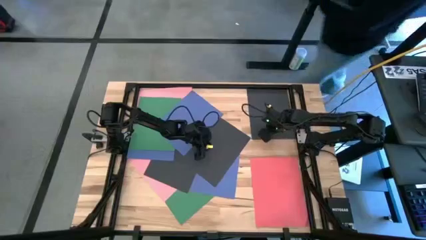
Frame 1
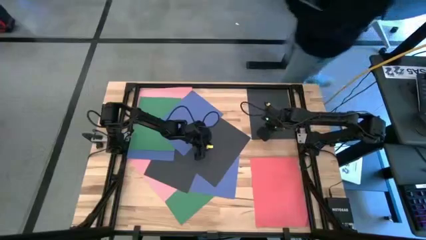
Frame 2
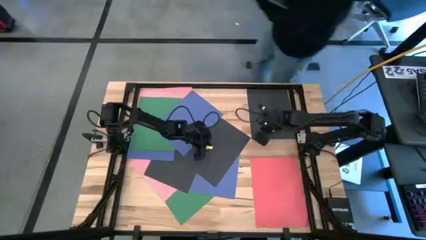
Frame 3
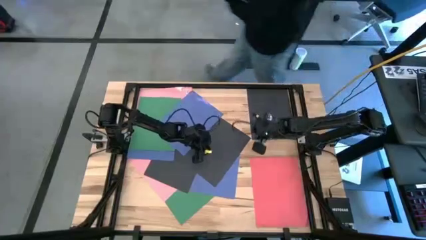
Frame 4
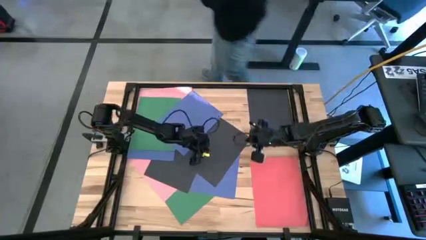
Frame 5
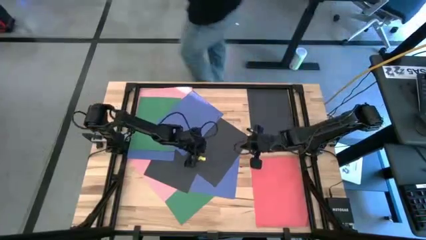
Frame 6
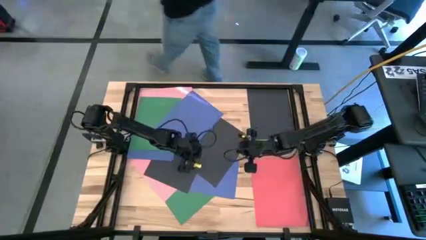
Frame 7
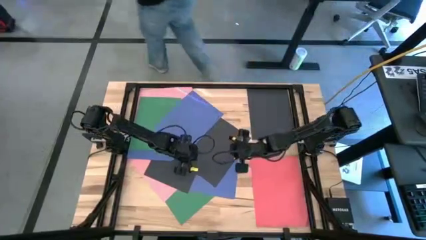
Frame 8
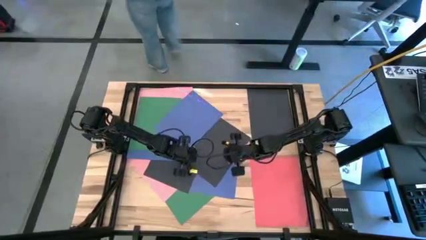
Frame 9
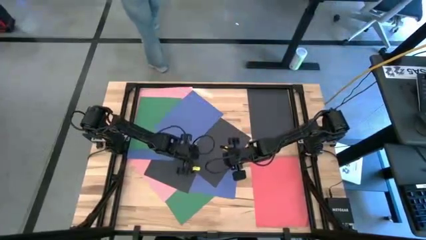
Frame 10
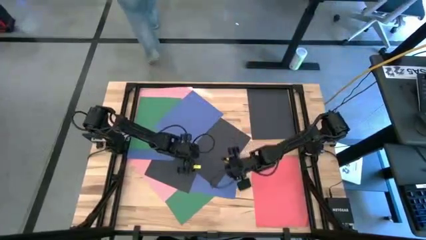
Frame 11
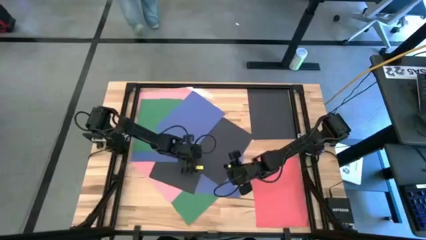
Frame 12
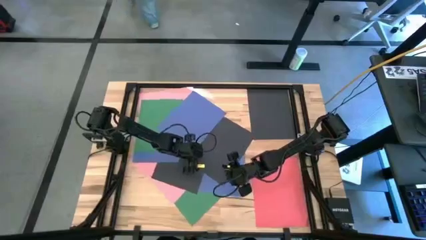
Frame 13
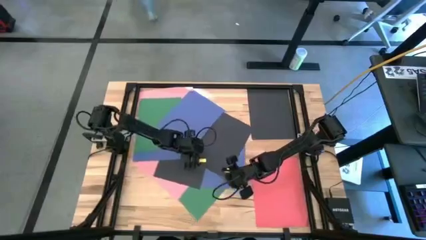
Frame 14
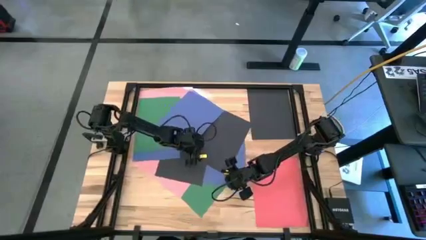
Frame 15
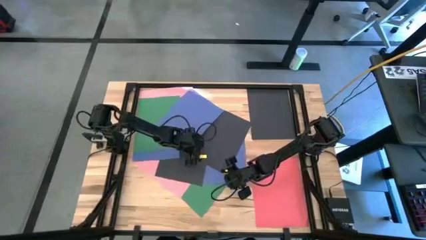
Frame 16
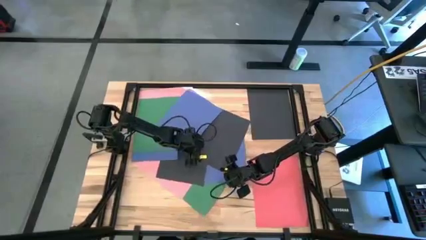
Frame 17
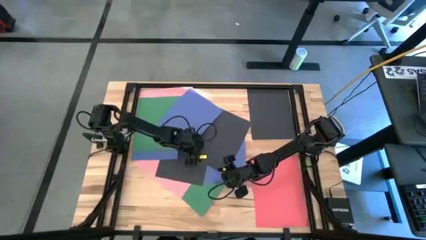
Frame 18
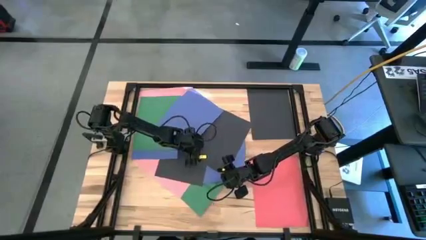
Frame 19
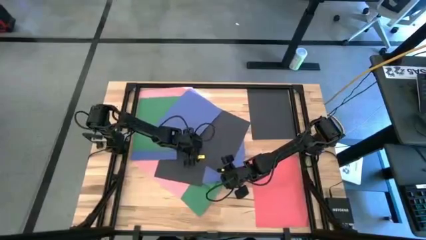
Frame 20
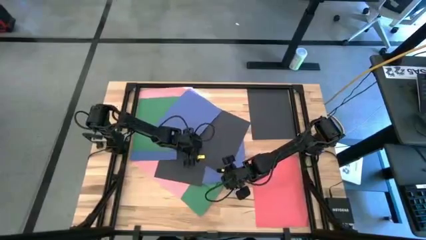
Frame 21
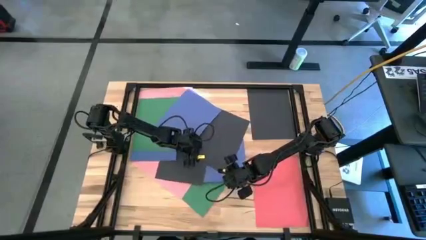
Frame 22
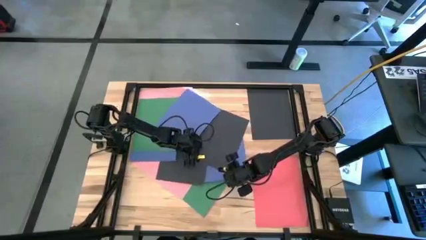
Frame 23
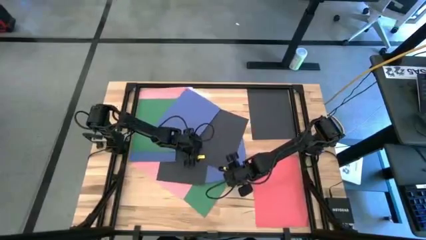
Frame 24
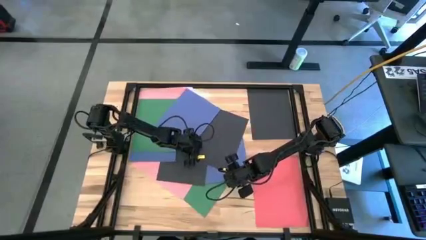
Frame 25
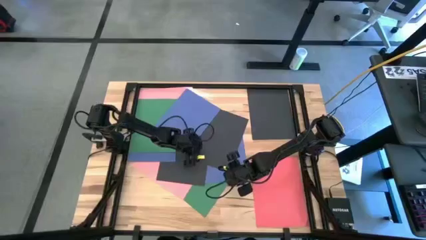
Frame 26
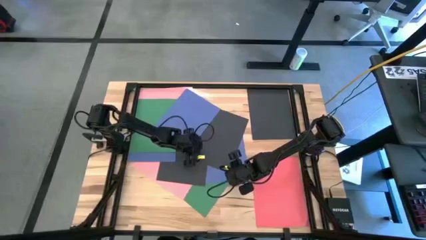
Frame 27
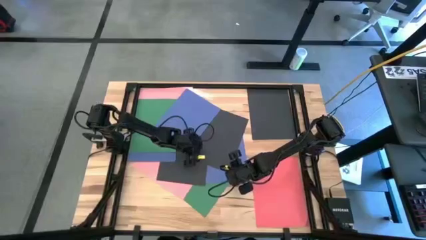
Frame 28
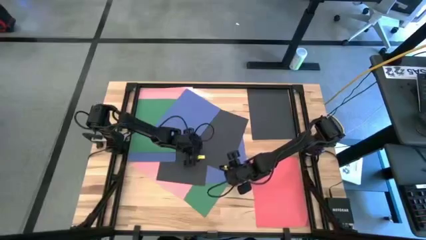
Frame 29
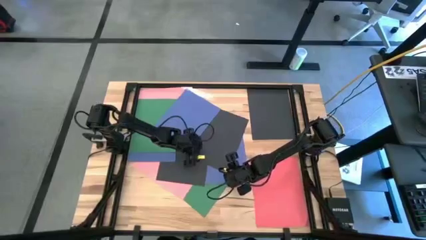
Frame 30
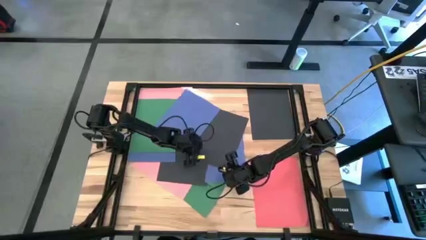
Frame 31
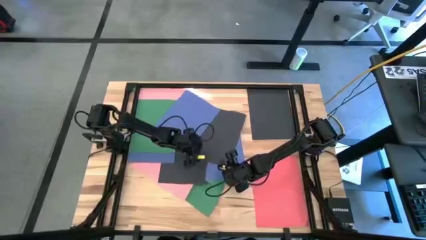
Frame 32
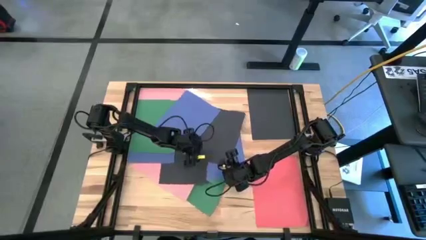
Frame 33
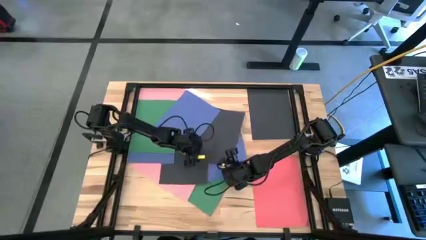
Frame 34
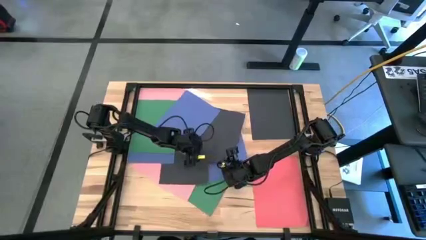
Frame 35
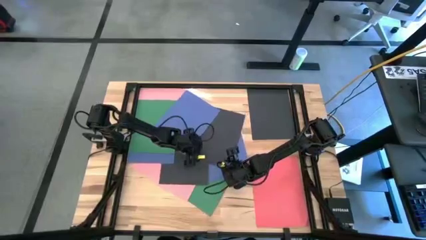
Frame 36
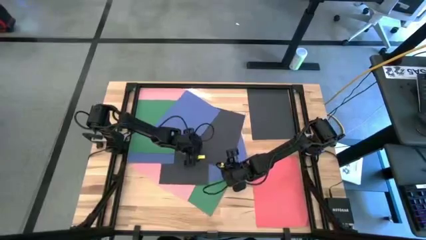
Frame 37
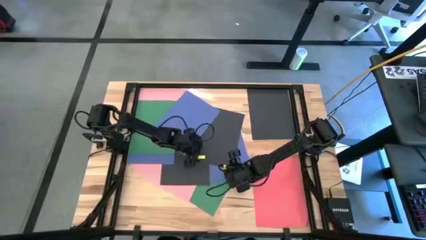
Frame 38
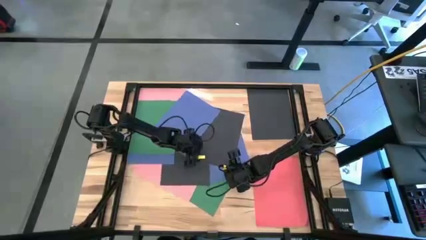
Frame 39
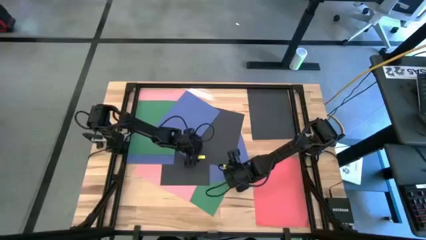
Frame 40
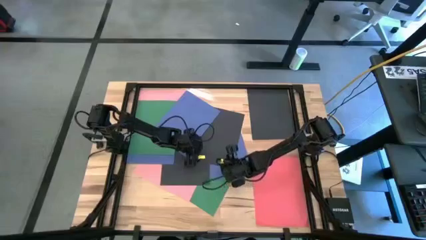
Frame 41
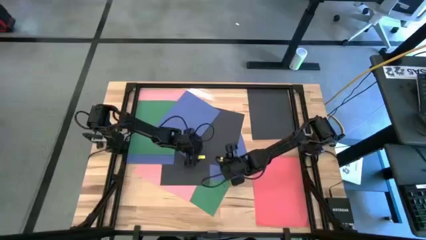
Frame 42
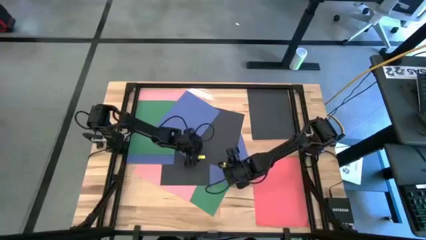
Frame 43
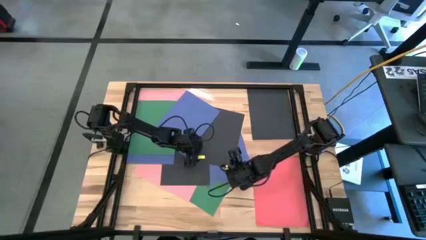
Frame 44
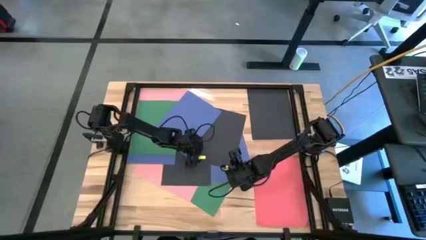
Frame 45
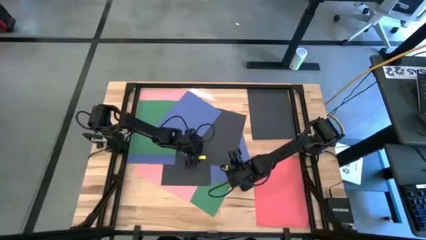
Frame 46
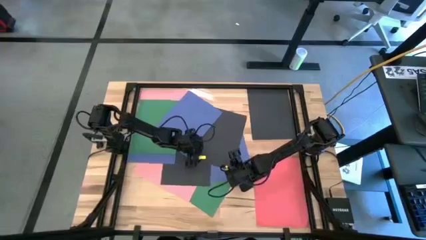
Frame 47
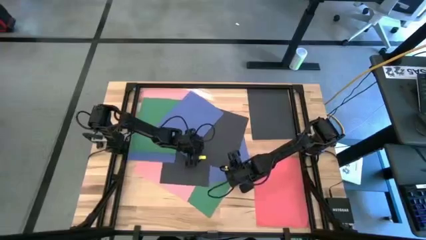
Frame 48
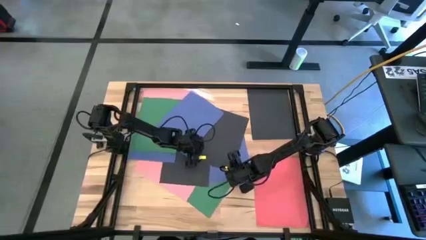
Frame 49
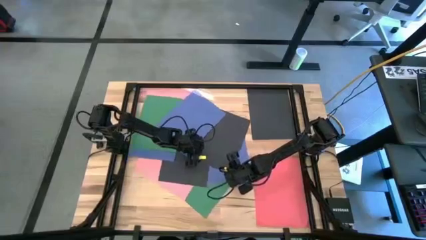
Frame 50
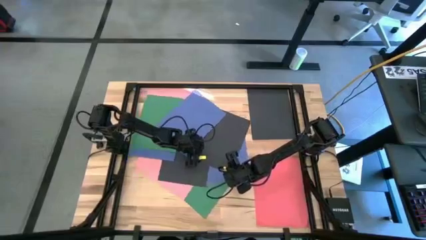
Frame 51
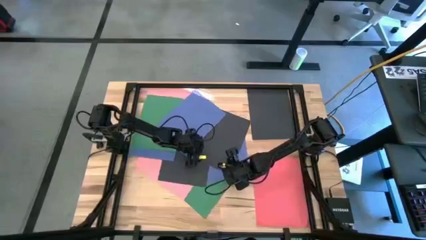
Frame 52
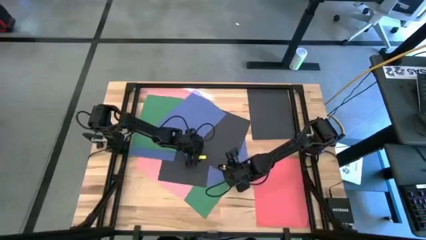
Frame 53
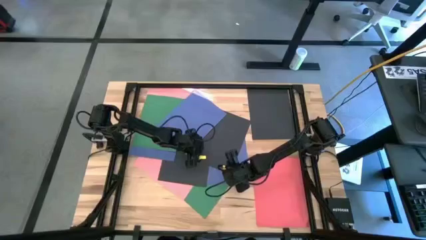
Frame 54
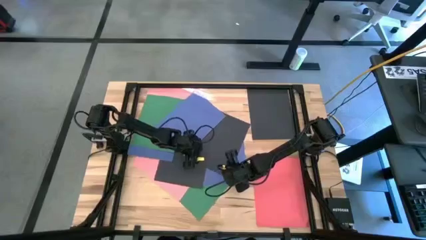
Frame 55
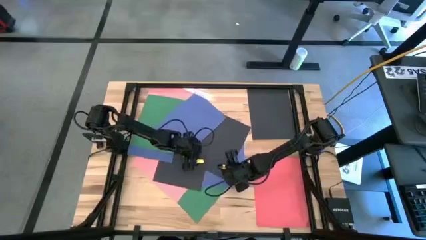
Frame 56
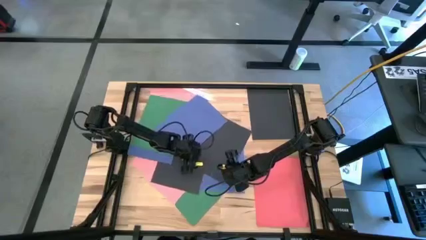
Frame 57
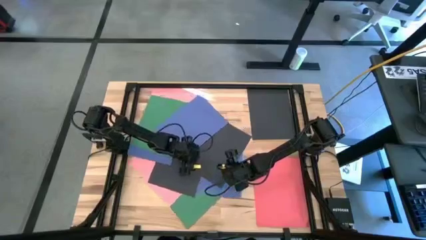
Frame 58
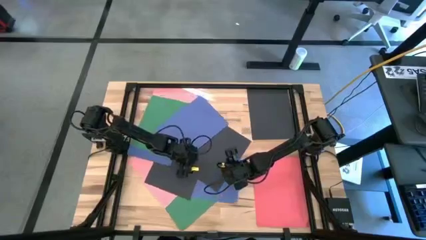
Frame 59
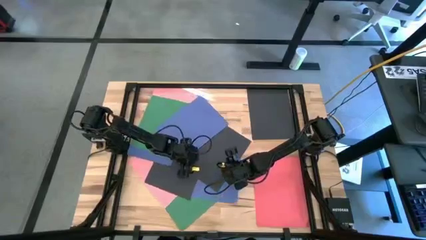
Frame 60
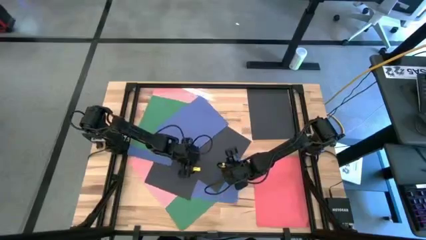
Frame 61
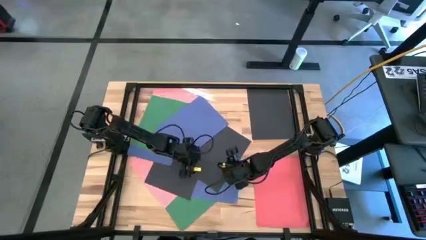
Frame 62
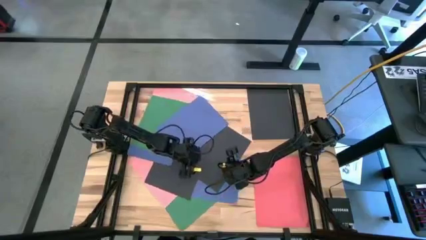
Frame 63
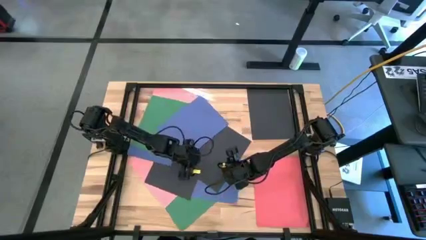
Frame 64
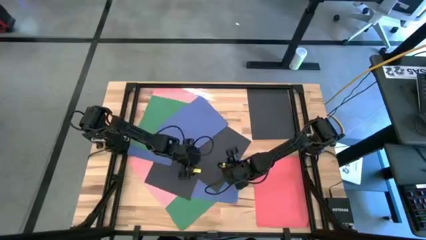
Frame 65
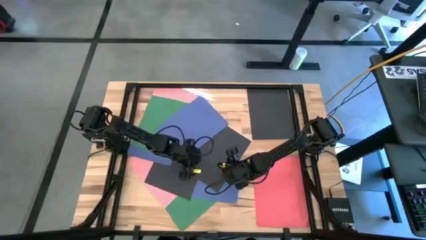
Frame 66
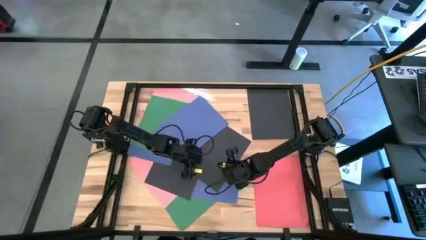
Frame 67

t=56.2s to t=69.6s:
Task: Organize paper
Stack the black paper on top of the other black paper on the table

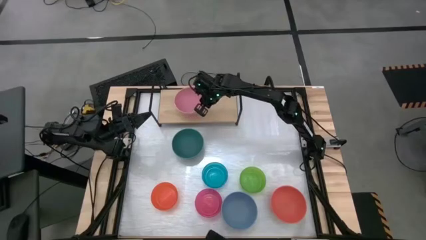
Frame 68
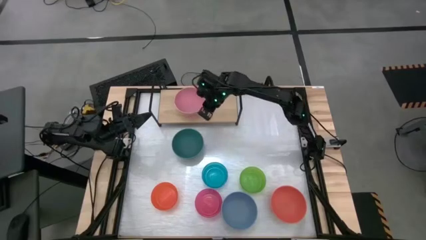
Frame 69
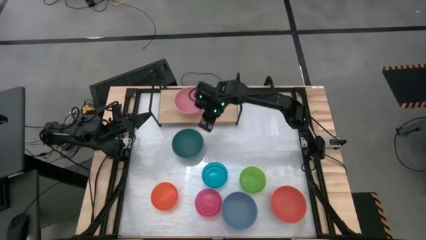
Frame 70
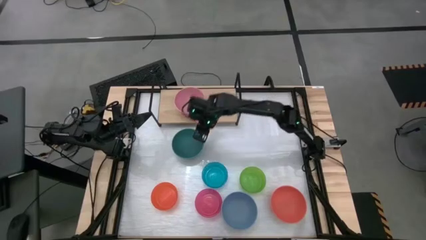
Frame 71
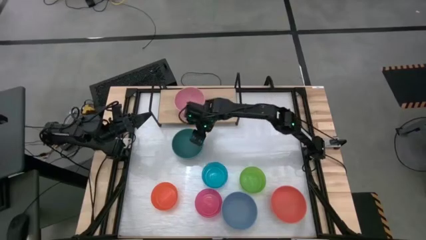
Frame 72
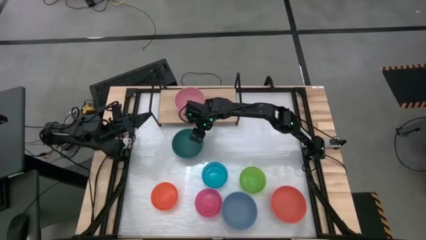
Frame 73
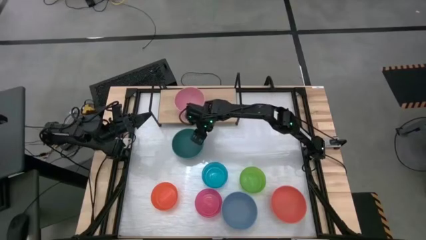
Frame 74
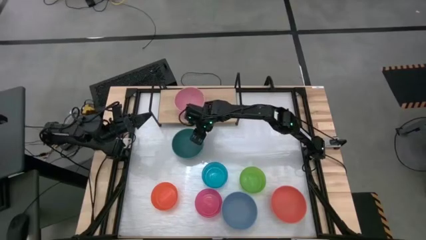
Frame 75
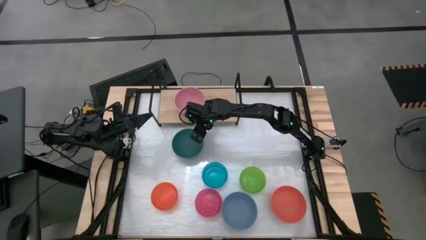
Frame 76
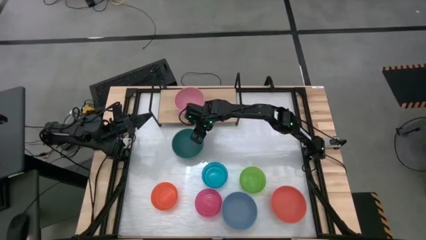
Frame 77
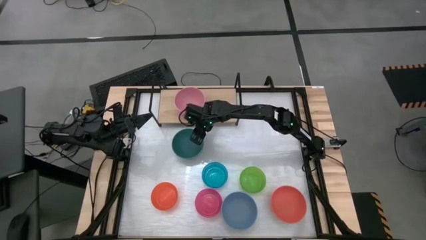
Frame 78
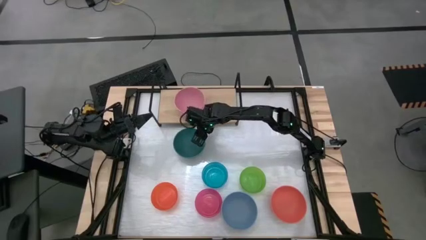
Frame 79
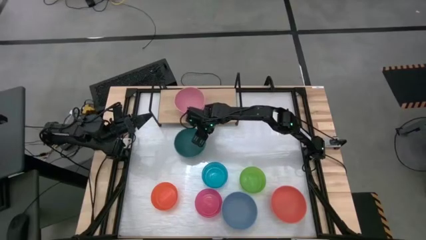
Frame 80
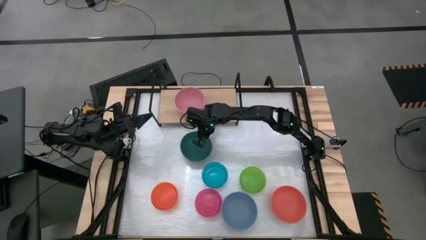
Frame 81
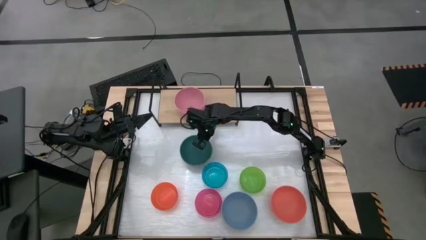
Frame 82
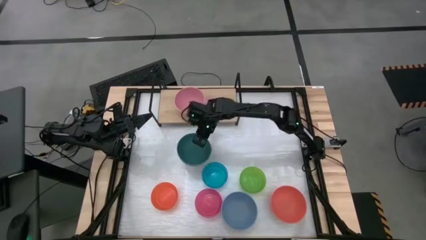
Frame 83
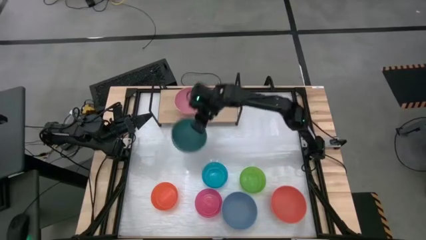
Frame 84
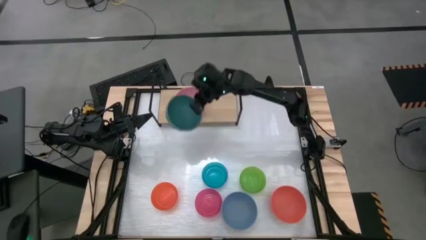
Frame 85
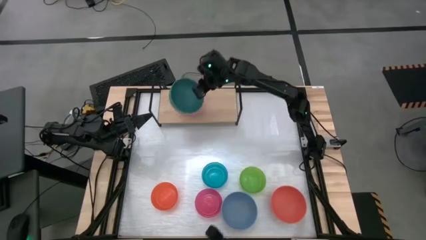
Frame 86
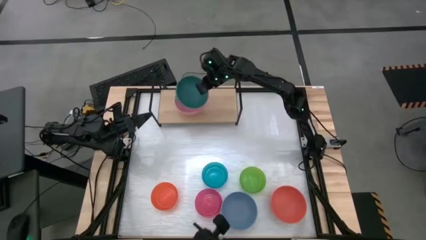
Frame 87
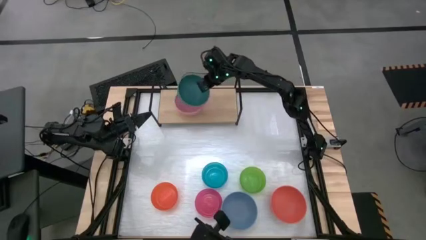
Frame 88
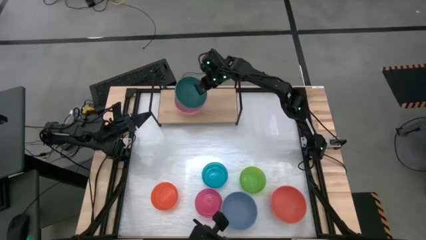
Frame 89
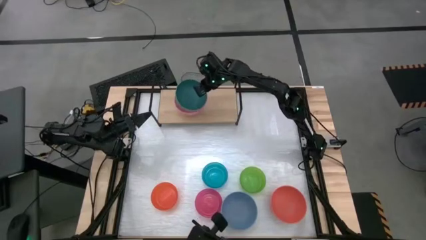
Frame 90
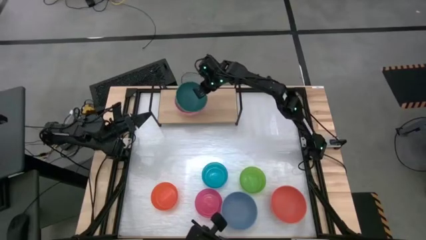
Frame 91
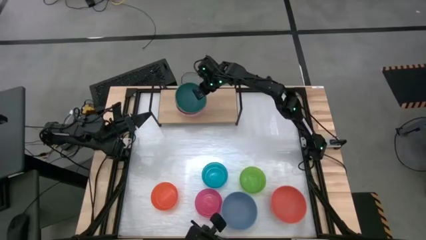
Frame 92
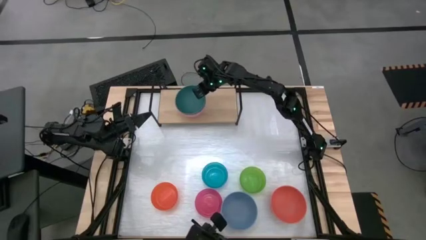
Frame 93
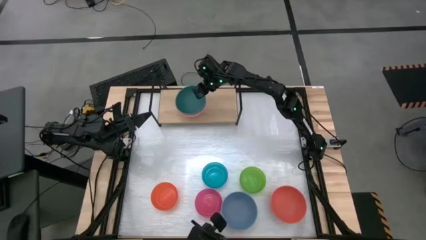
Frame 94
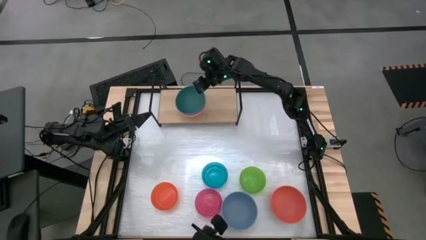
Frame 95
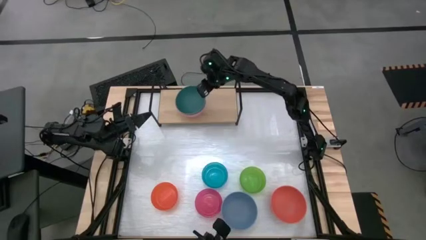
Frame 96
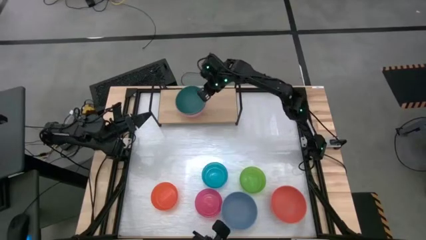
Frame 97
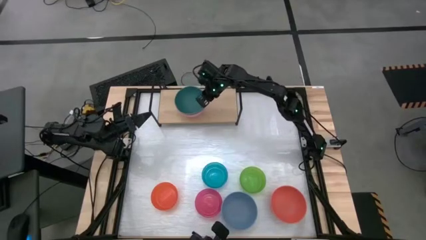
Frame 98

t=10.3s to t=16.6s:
Task: Place and stack bowls onto a shelf
Stack the green bowl on top of the pink bowl on the shelf
